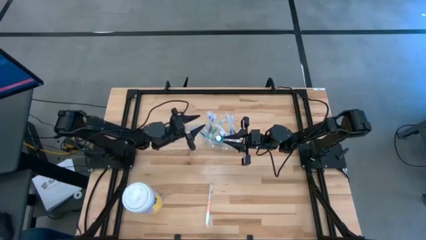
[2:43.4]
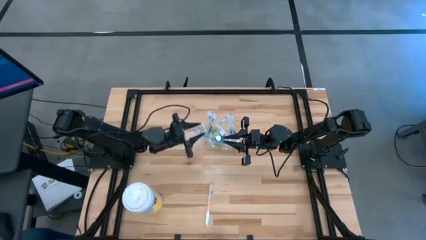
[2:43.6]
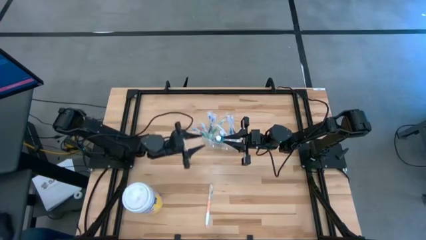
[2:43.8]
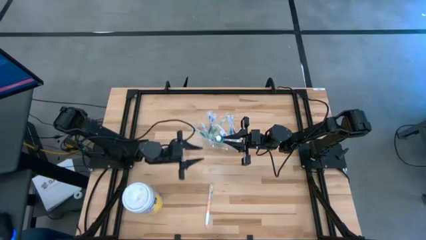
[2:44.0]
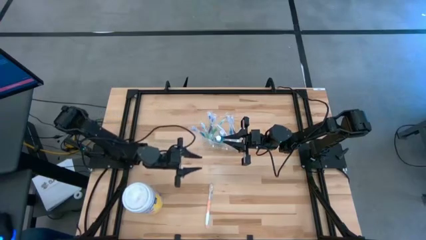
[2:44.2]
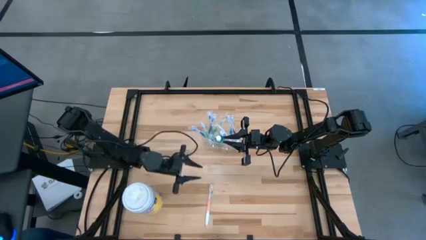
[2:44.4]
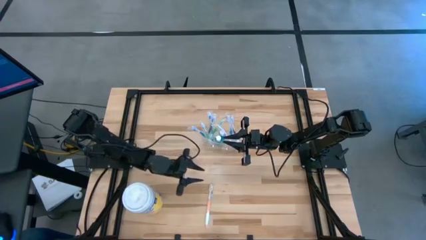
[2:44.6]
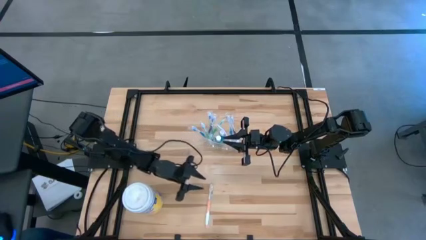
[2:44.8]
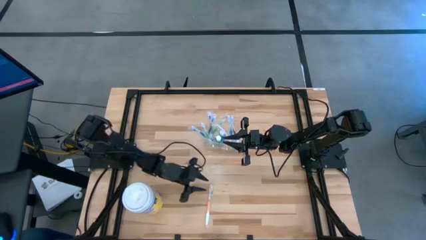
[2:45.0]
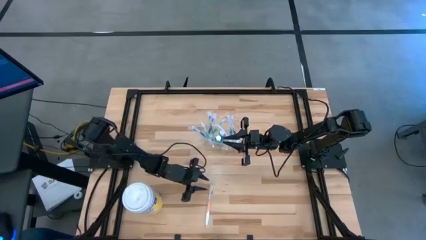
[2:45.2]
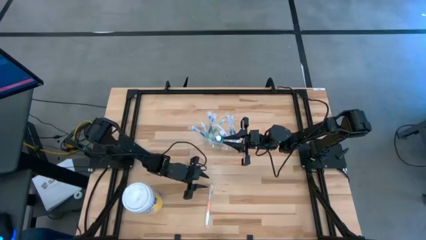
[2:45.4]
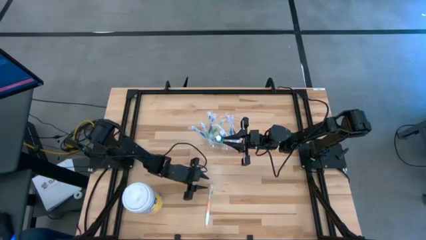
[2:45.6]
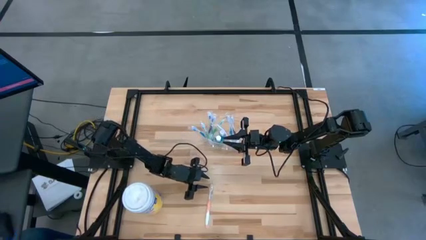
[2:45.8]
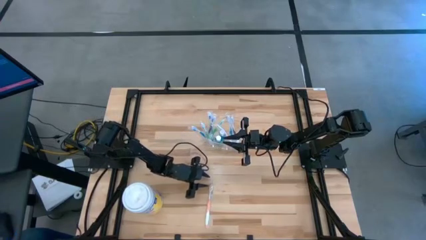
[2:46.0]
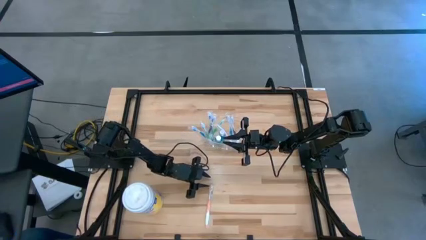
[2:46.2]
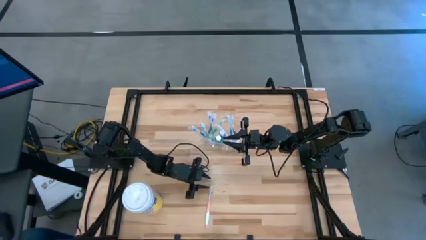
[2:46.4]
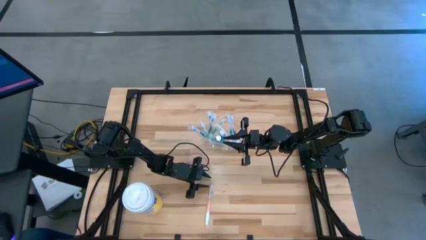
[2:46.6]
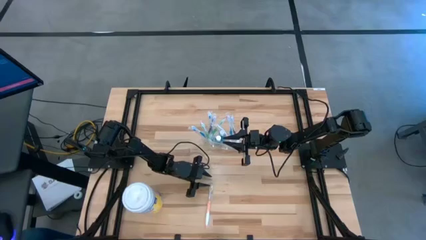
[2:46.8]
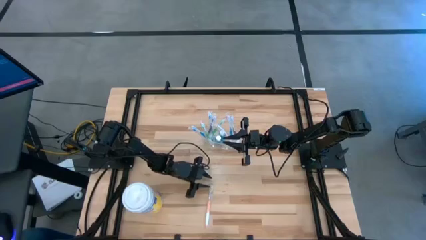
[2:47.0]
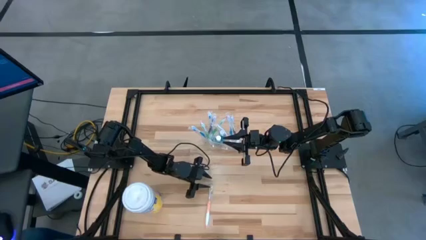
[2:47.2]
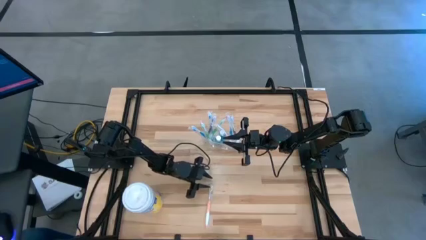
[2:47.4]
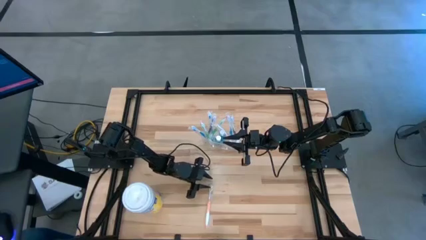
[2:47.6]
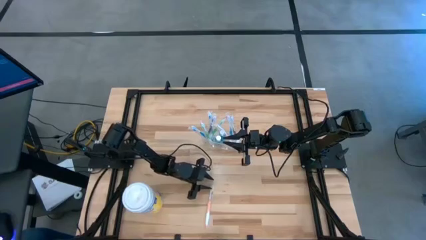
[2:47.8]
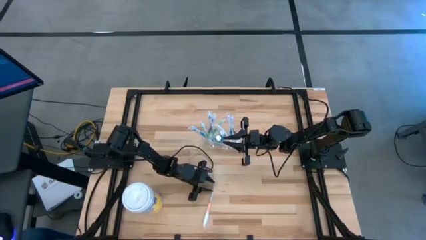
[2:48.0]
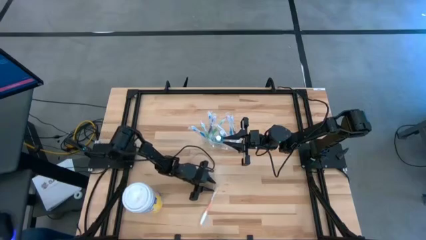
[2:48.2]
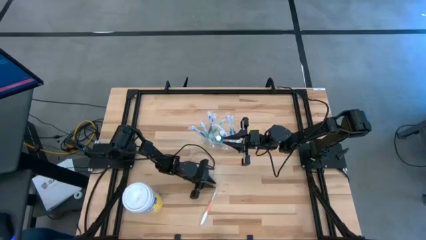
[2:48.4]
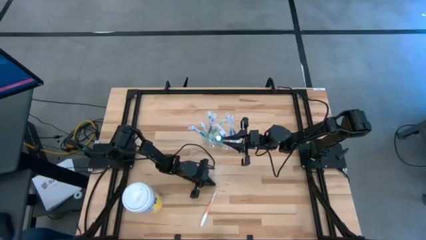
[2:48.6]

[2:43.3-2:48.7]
Task: Pick & Place toothbrushing station
Put the orange toothbrush into the transparent organizer

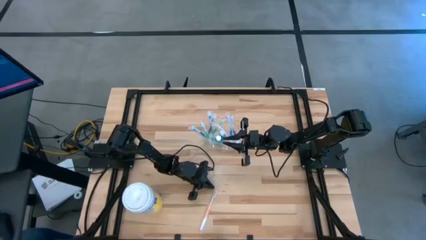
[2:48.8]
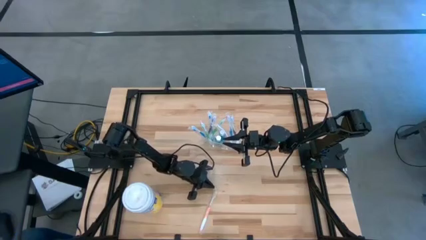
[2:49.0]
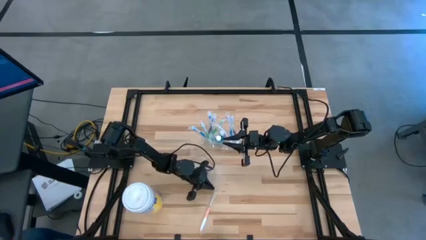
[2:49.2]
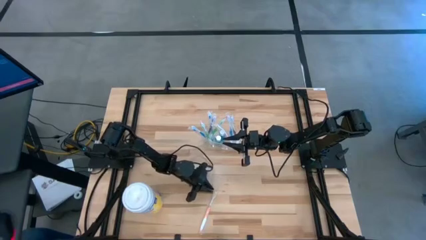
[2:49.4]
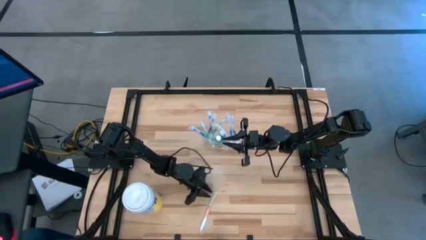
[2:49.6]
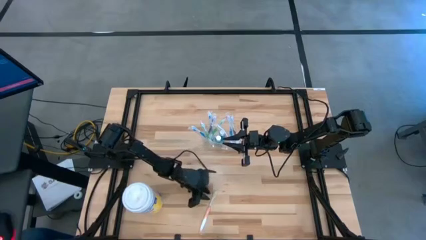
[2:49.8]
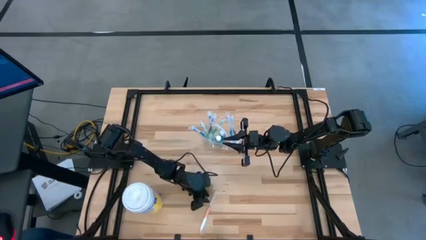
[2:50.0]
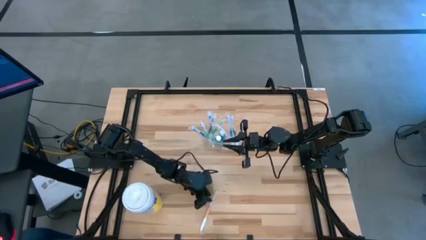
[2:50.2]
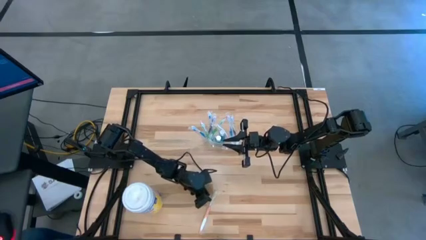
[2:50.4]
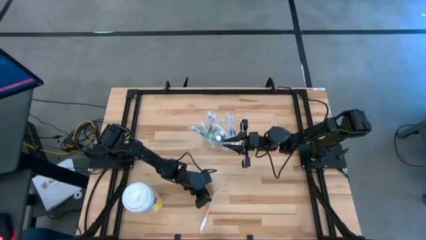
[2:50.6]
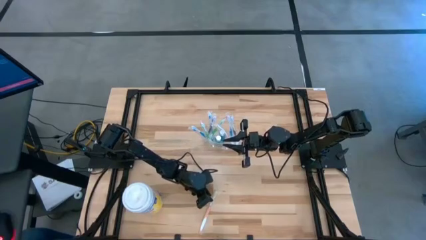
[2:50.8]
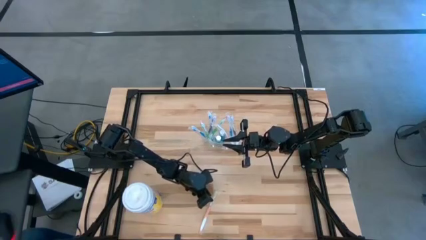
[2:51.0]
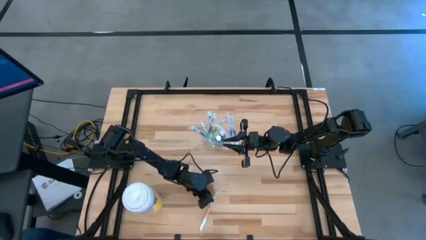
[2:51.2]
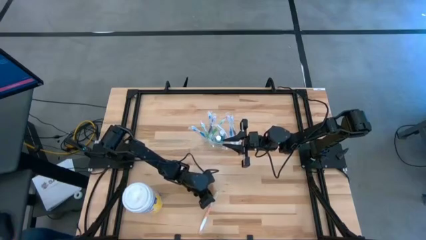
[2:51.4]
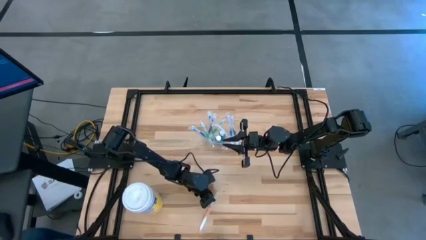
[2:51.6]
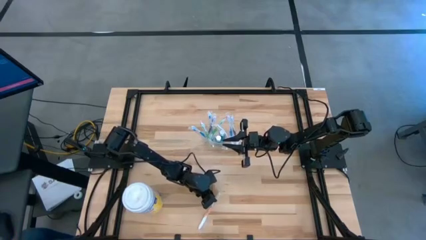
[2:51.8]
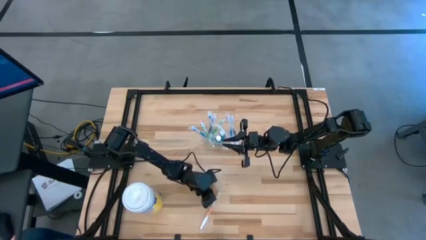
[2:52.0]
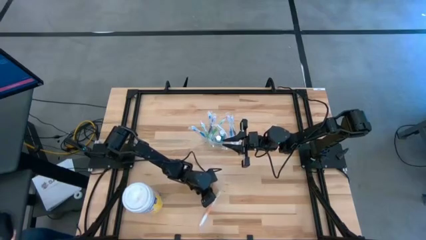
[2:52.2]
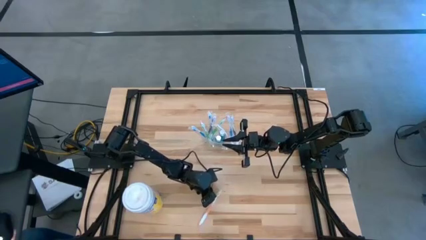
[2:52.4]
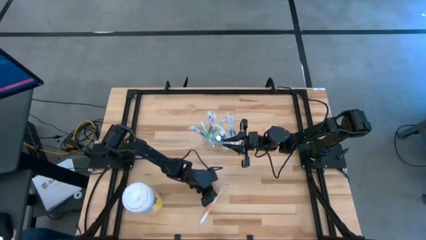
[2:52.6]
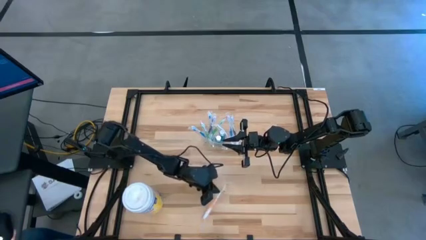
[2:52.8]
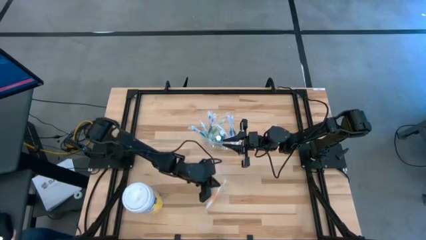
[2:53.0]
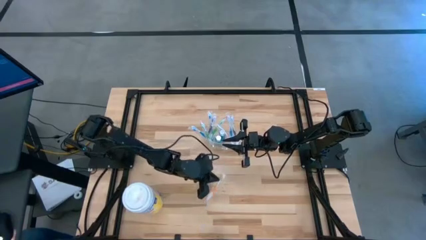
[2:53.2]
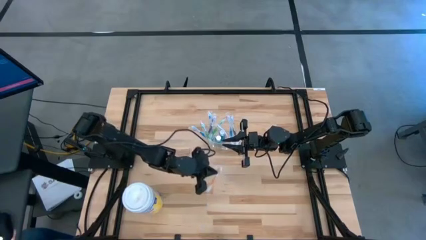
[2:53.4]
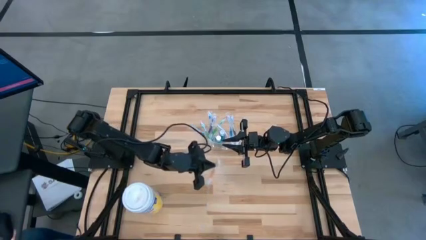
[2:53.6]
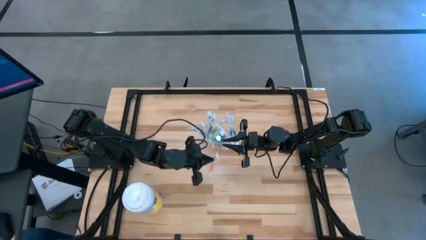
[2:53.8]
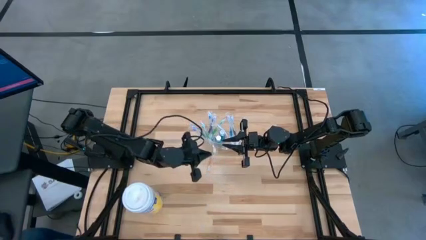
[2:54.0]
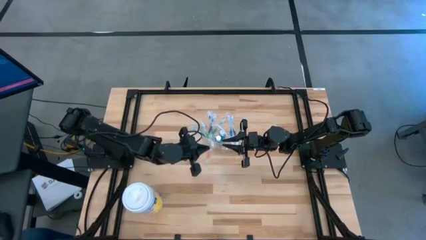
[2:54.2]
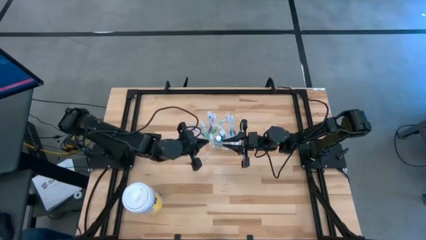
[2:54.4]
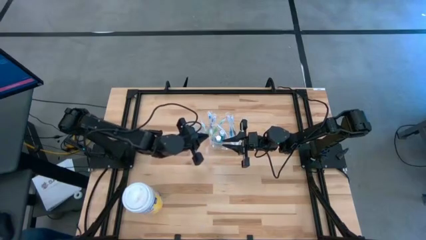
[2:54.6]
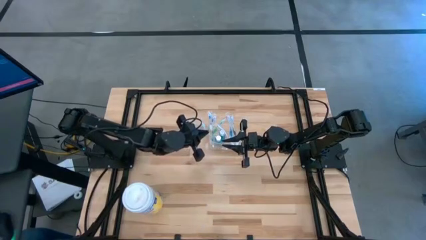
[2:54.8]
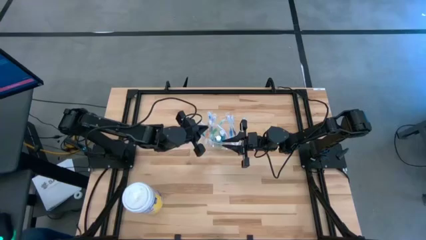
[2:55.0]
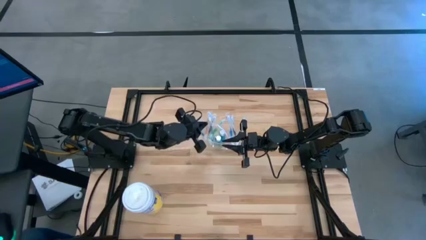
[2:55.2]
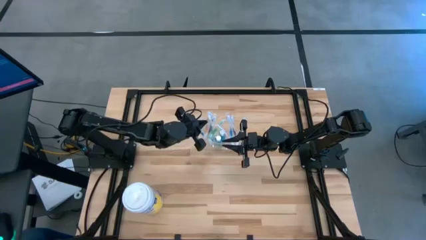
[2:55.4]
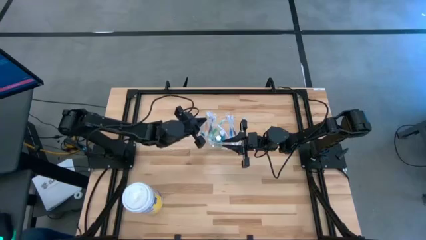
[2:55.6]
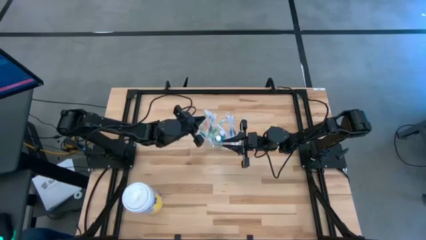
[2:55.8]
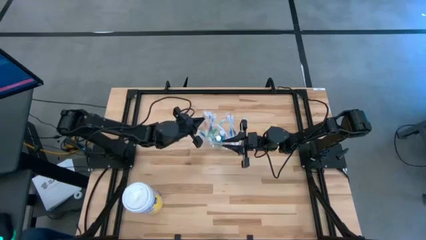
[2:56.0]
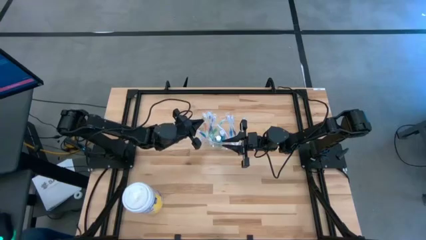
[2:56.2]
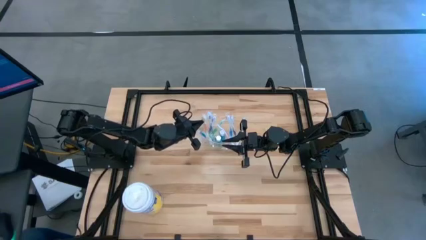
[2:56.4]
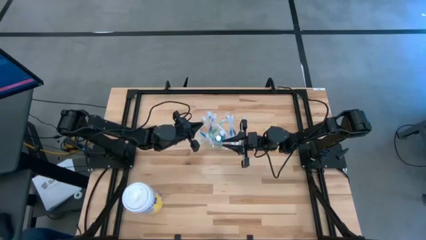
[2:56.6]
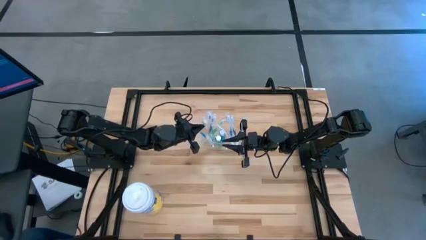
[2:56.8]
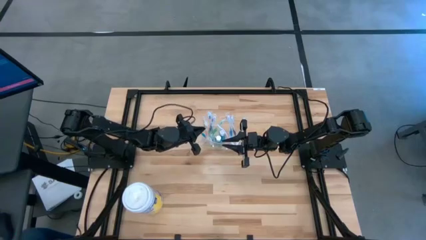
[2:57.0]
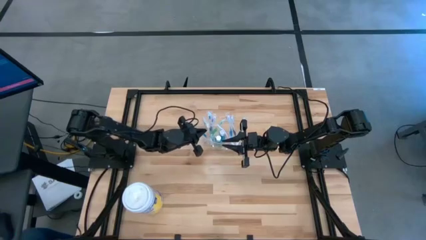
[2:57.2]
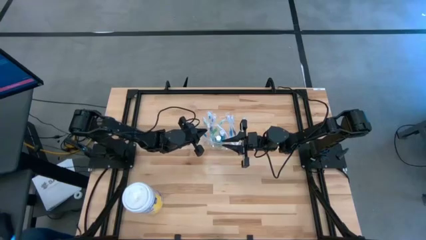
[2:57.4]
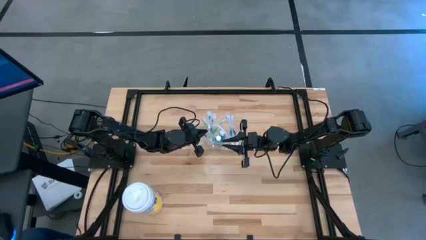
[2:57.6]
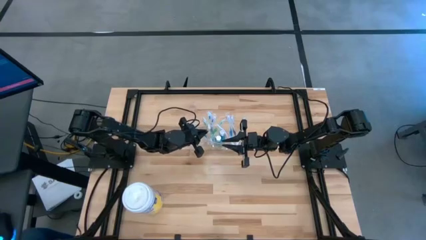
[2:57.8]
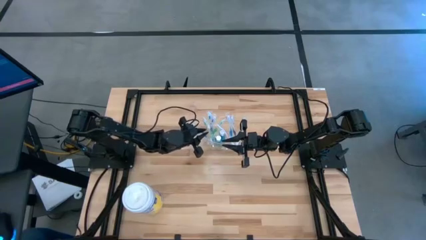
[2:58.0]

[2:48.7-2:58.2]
Put the orange toothbrush into the transparent organizer
